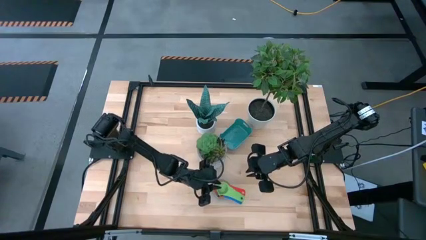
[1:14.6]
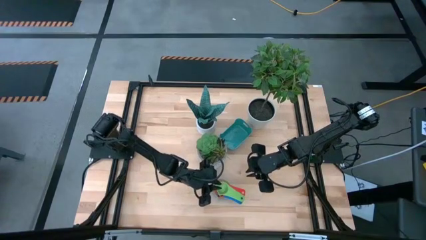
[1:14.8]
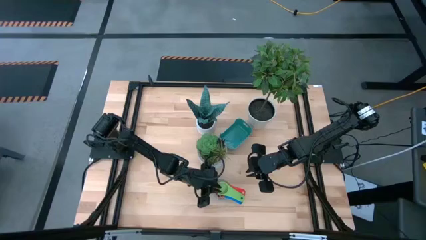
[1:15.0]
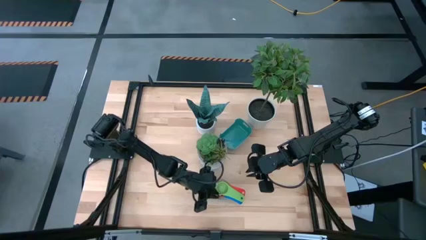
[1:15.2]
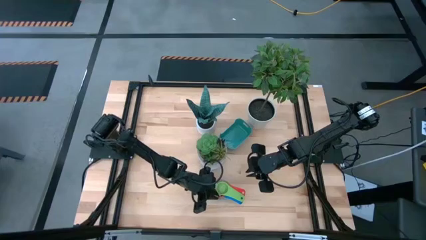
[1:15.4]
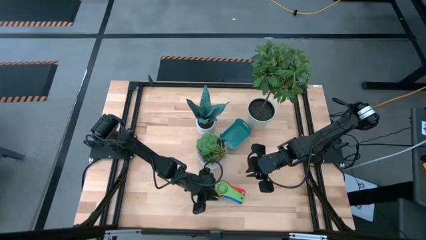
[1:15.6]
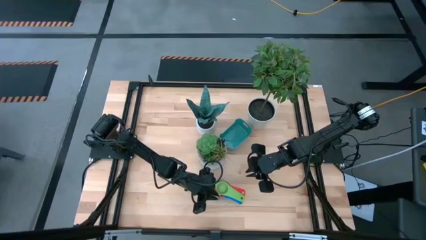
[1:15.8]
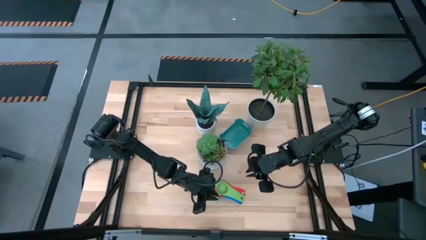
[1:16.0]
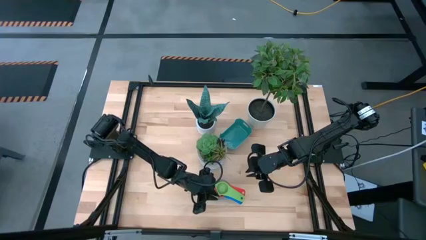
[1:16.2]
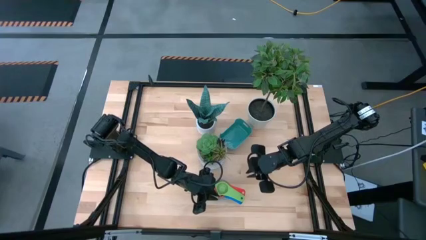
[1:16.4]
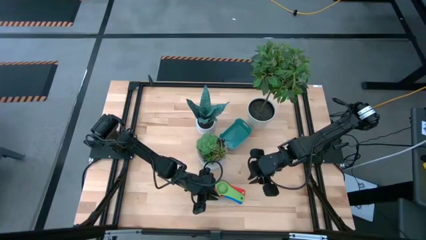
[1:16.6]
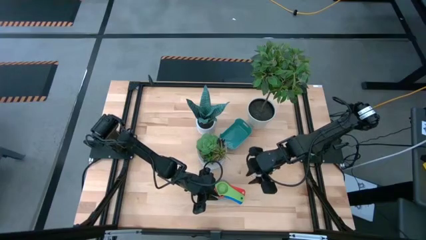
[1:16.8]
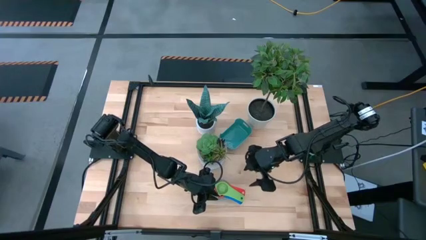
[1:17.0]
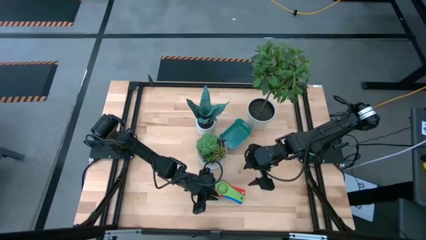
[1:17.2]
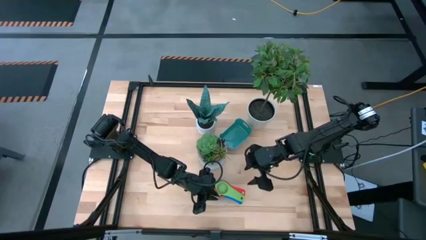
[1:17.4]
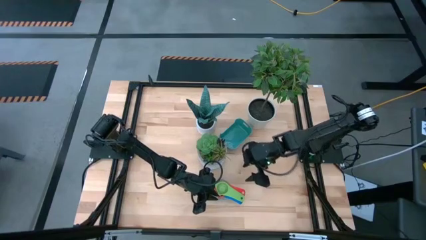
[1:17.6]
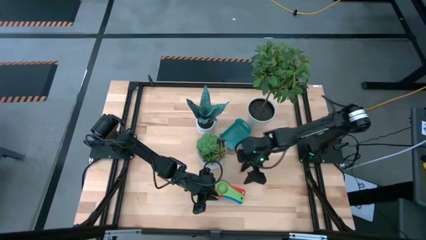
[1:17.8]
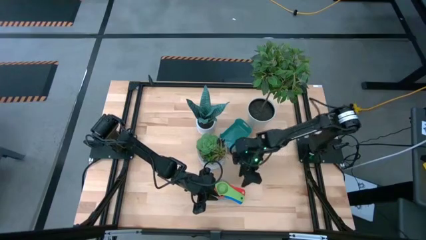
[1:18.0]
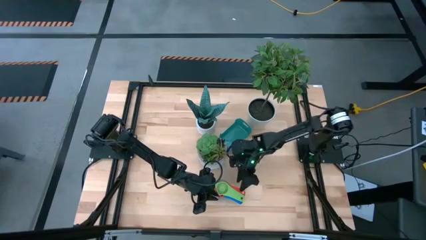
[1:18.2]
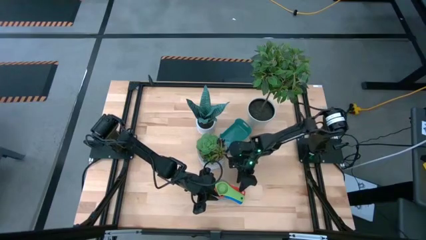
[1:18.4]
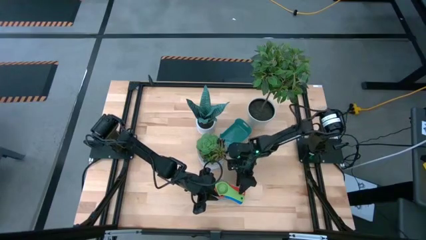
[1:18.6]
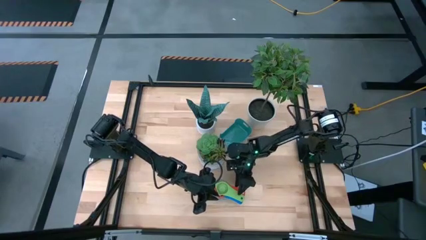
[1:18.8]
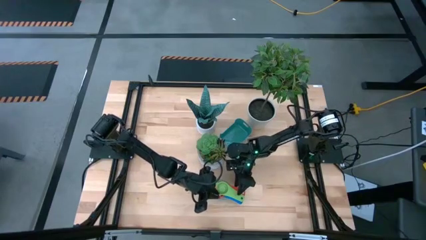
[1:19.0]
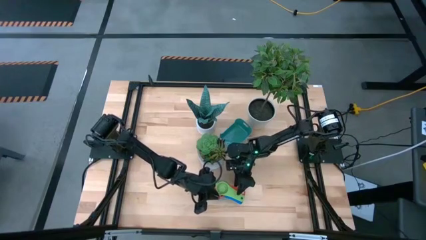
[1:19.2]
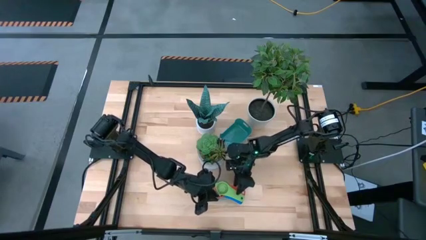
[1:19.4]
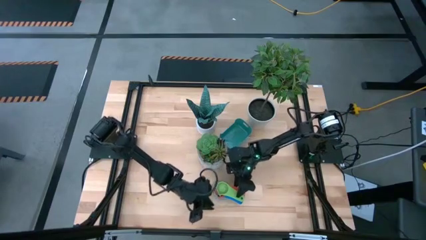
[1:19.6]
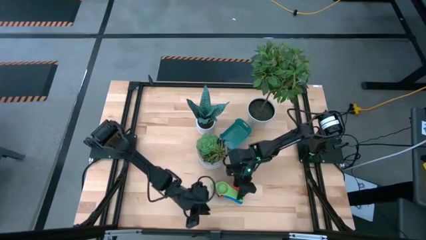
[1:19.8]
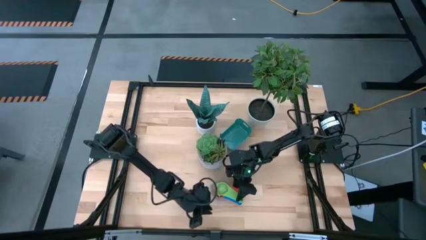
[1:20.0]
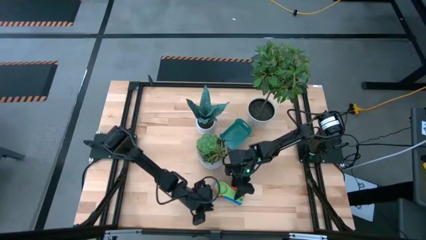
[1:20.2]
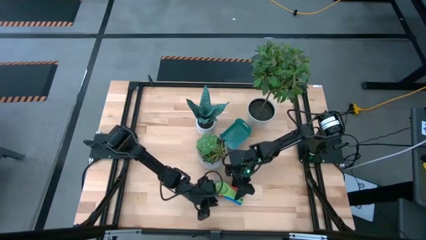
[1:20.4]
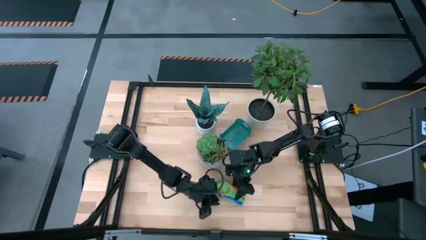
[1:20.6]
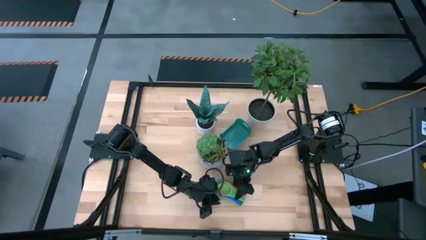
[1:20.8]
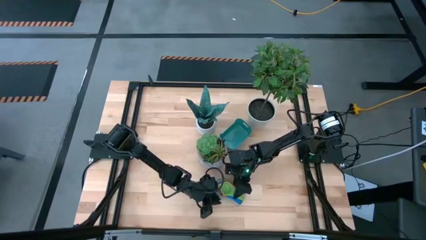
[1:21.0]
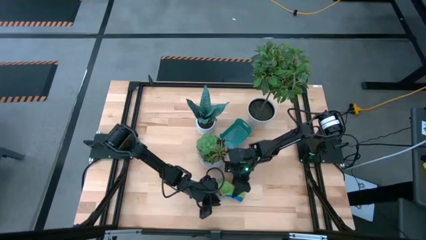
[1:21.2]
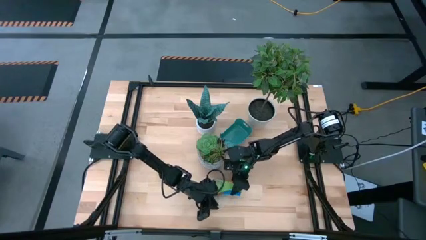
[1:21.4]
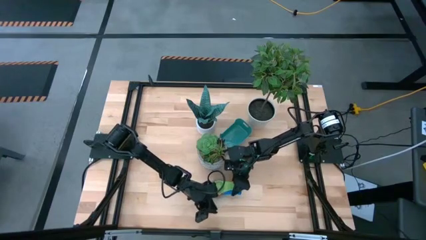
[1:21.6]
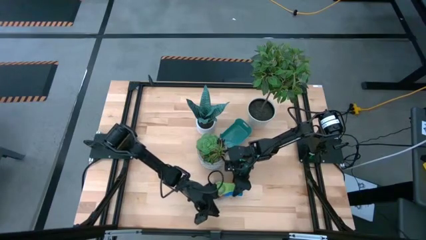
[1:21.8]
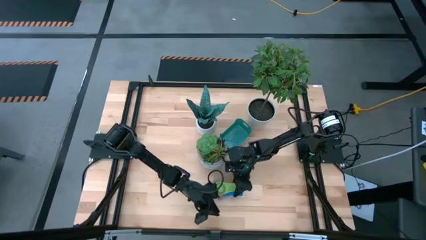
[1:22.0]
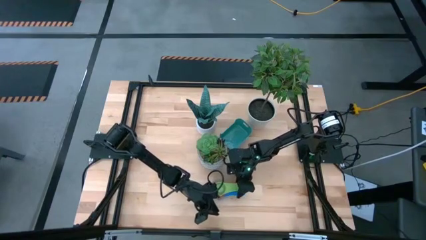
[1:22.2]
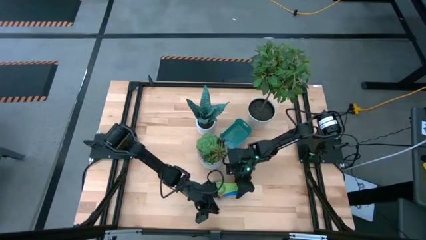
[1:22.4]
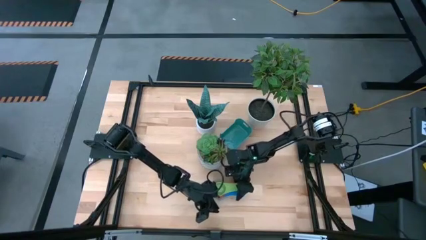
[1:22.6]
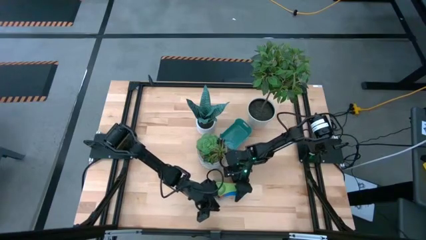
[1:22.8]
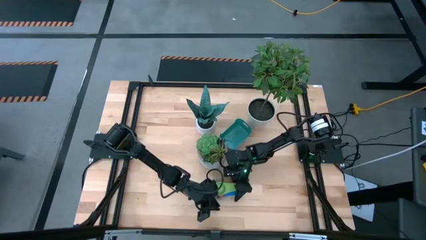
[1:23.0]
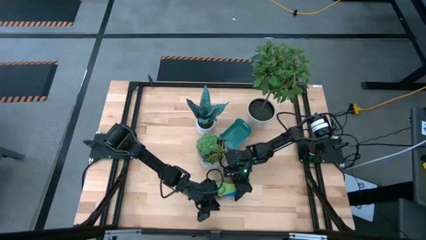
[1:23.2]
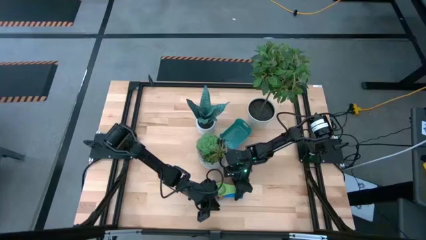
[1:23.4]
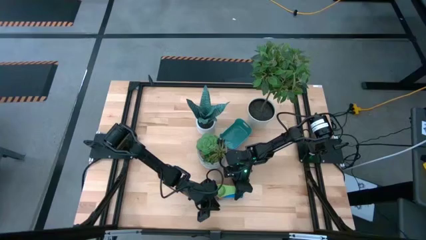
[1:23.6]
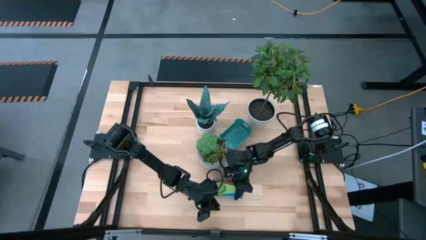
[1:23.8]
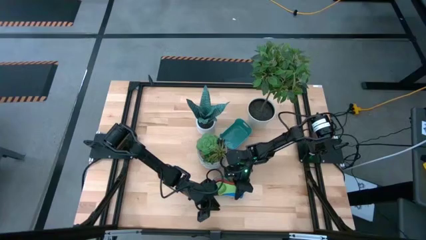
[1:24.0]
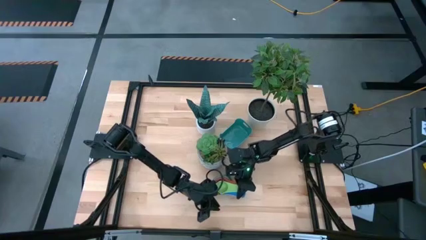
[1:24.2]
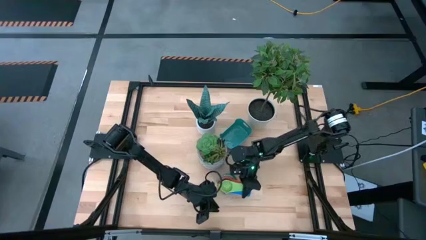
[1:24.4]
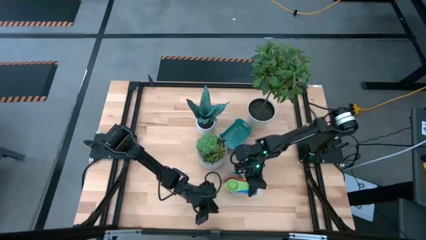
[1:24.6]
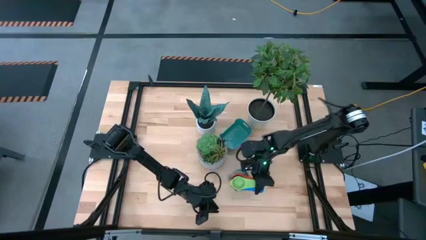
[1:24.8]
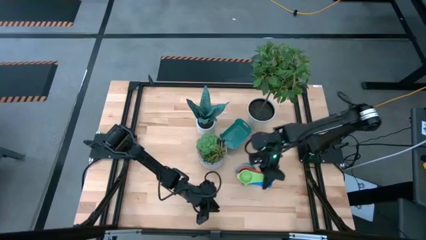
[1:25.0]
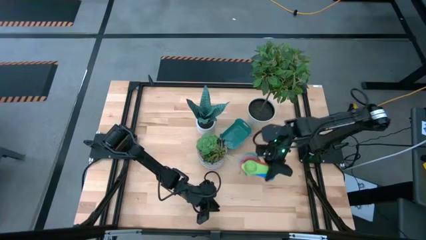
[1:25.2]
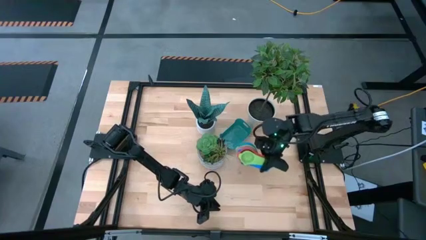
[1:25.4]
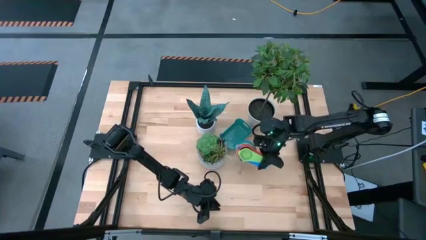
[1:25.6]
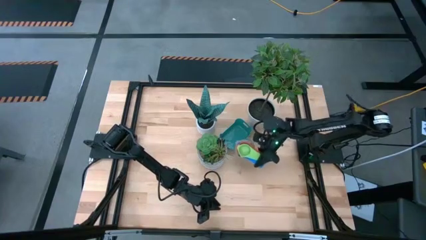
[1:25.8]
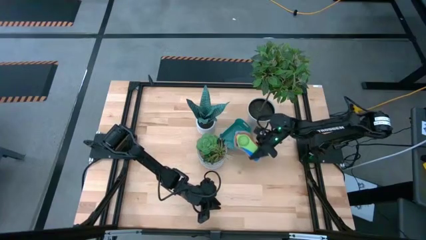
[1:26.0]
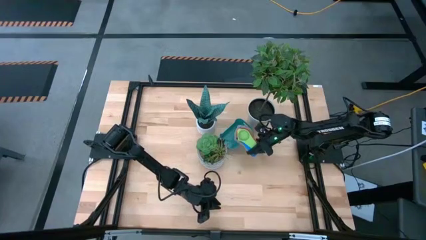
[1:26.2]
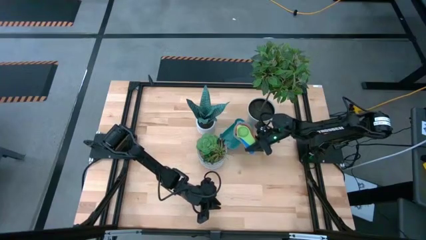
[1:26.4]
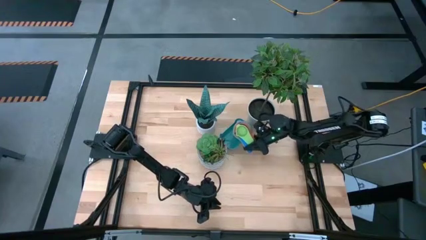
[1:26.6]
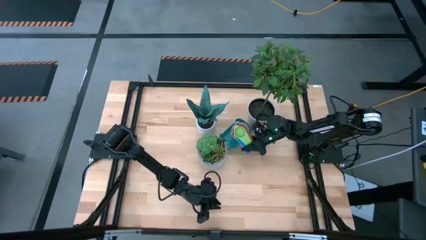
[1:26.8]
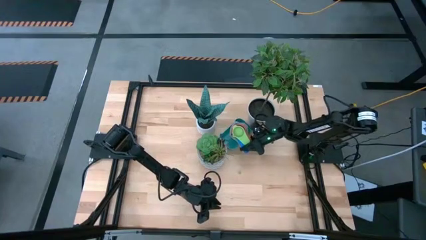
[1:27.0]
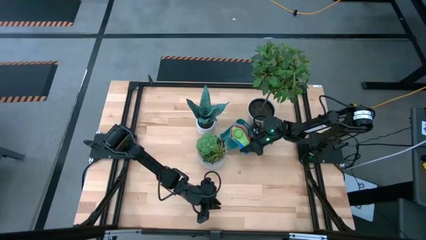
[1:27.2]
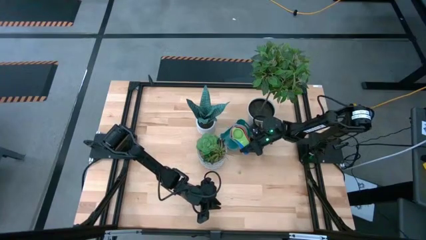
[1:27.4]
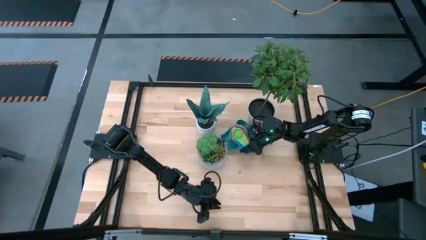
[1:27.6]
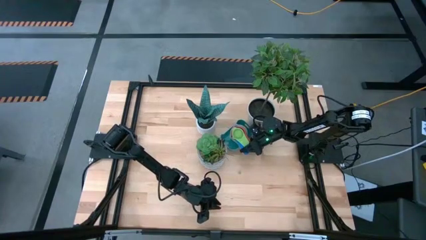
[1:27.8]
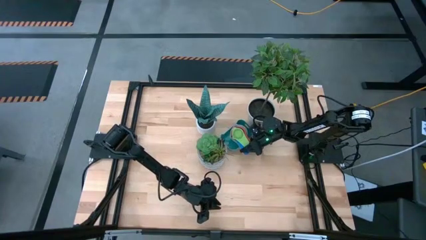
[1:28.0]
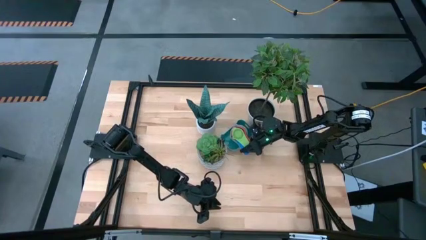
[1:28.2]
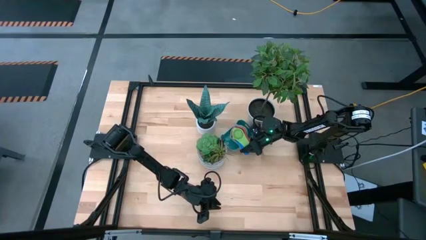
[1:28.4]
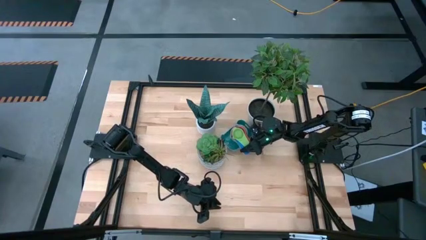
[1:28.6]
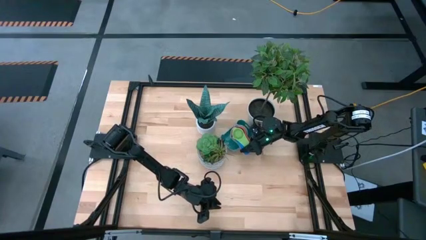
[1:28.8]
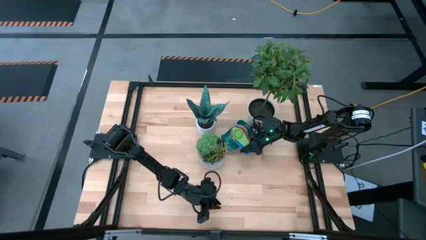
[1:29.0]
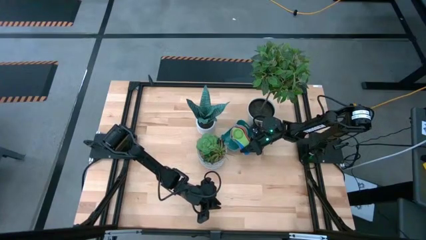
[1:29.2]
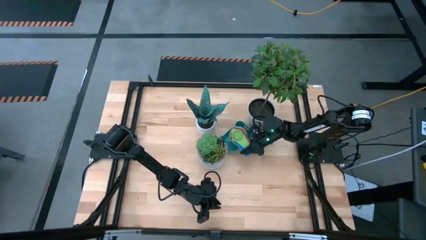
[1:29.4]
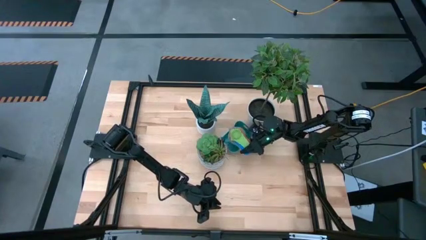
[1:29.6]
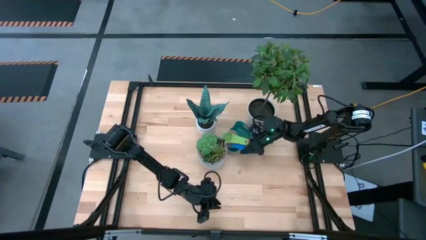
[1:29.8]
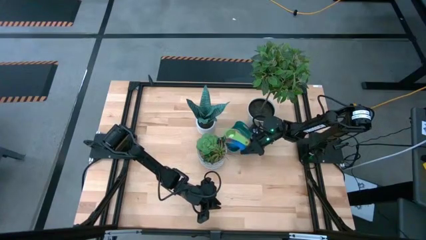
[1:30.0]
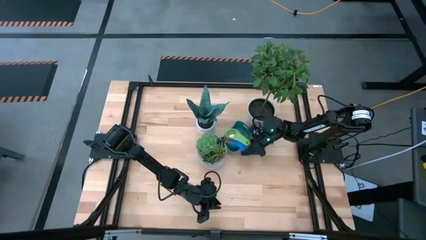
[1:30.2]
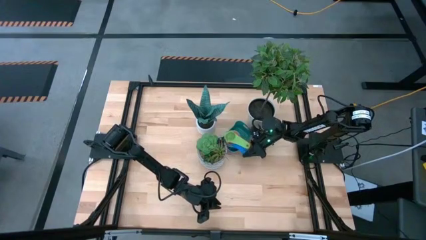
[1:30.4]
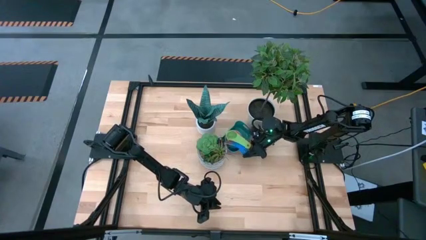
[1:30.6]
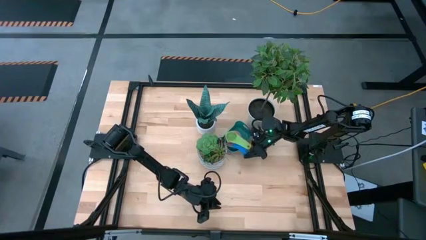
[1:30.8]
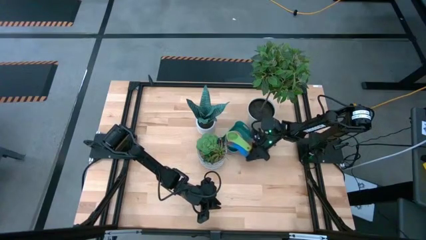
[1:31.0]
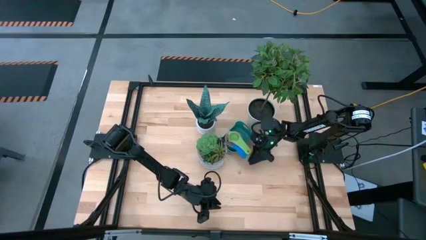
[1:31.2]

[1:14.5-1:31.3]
Task: Nest measuring cups in basket
Put the stacked measuring cups into the green bin
